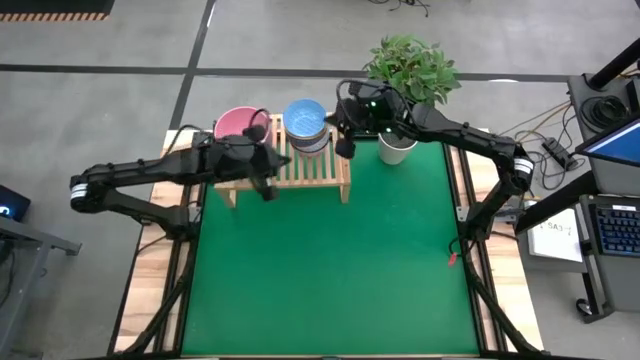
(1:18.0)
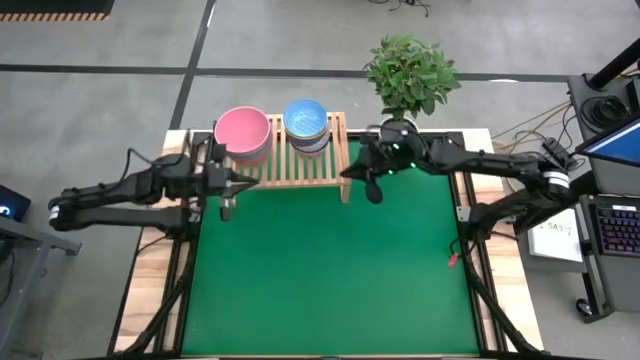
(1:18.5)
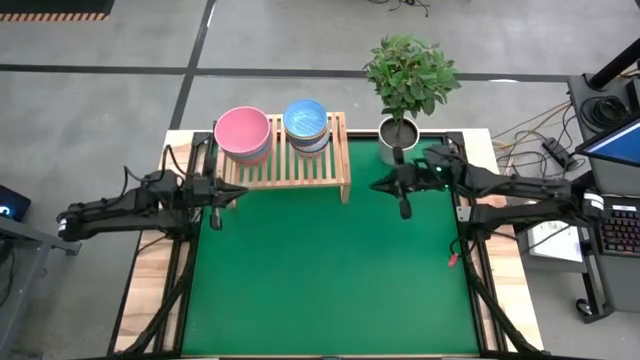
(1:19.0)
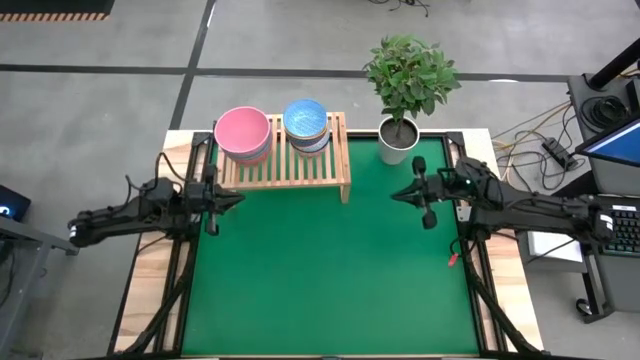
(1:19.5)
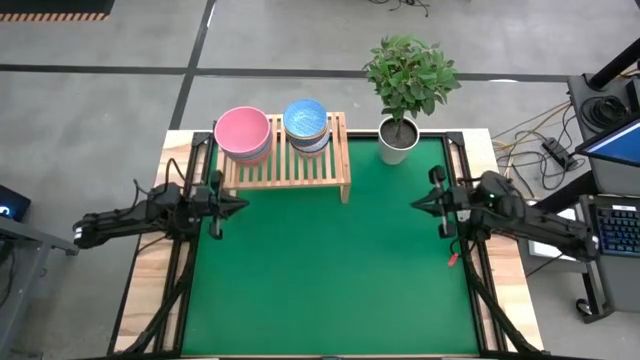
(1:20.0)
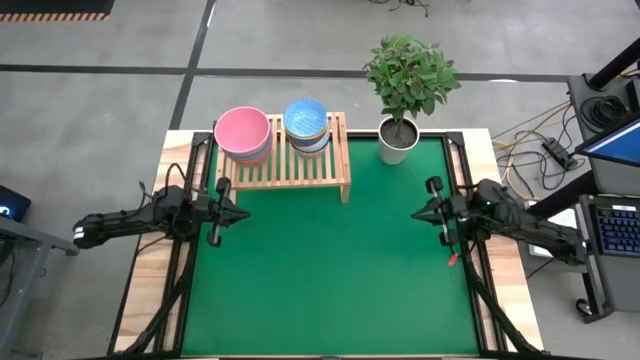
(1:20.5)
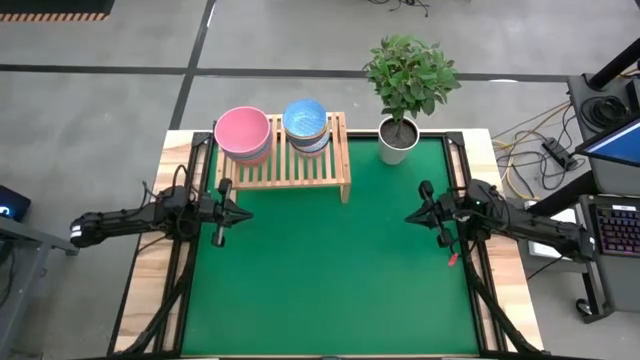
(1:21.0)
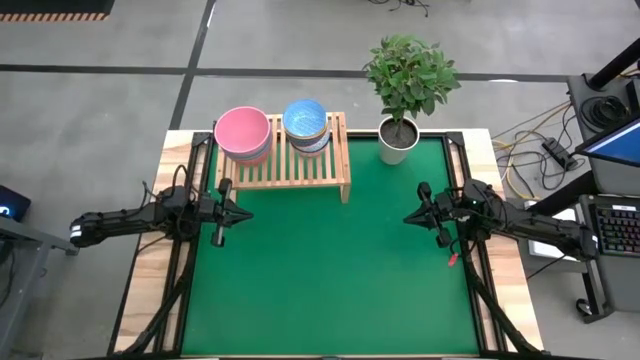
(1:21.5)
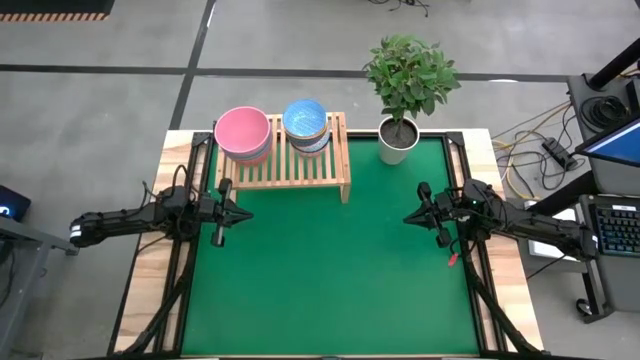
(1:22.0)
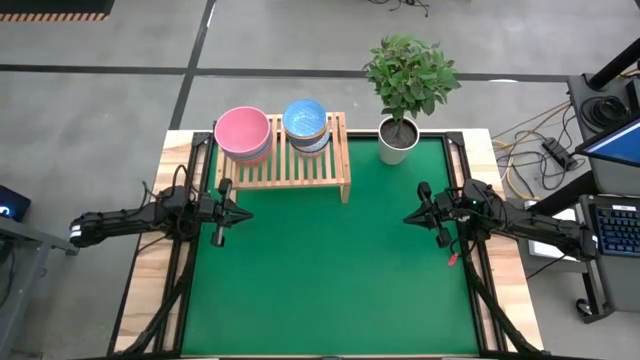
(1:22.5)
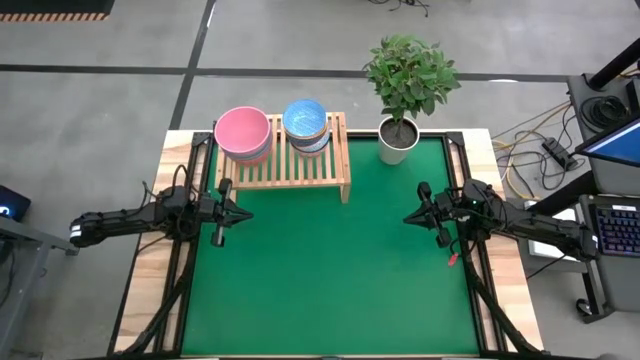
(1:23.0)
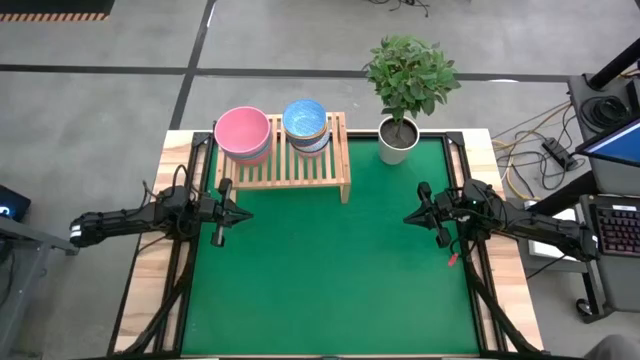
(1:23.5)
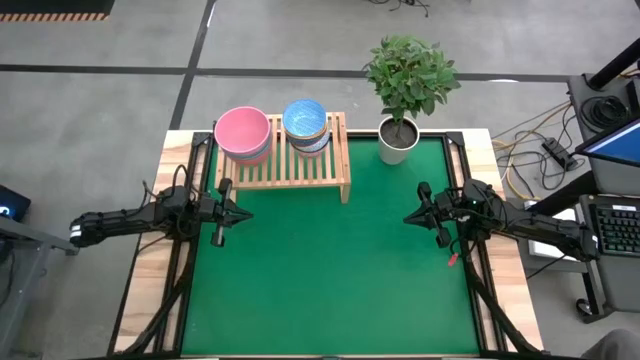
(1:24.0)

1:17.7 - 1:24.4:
Task: Place and stack bowls onto a shelf
Return to Home Position

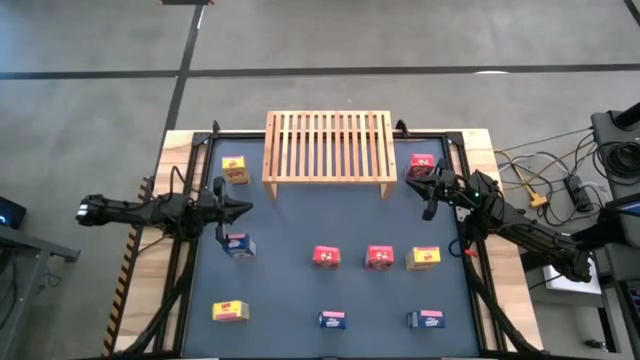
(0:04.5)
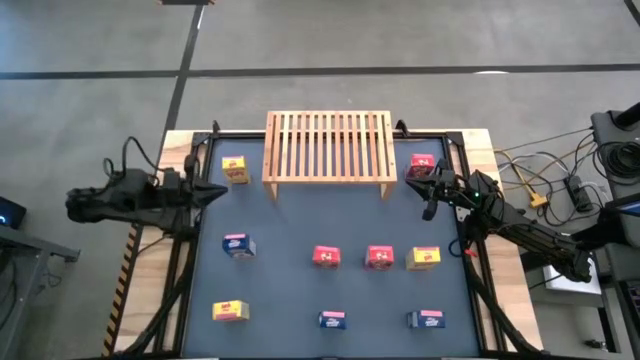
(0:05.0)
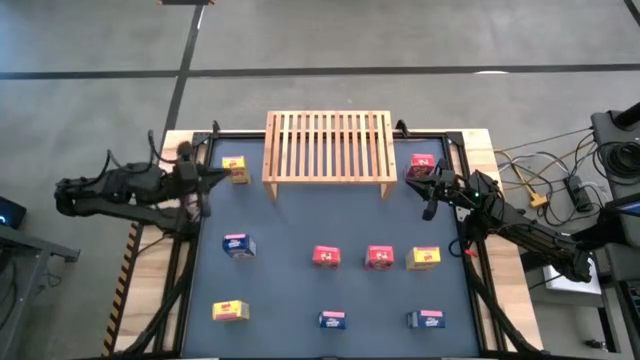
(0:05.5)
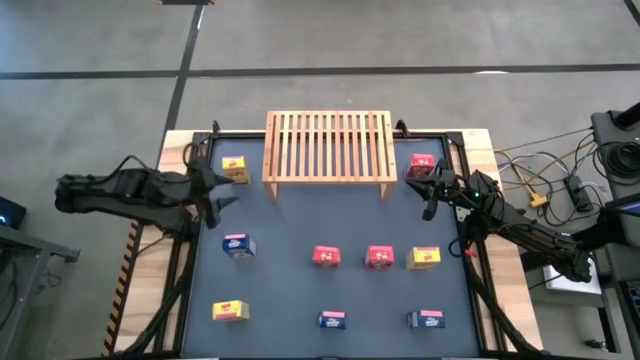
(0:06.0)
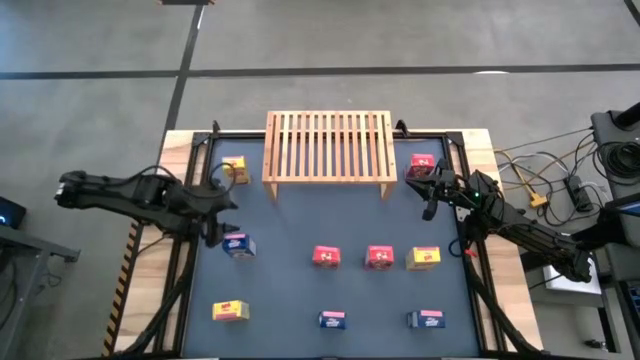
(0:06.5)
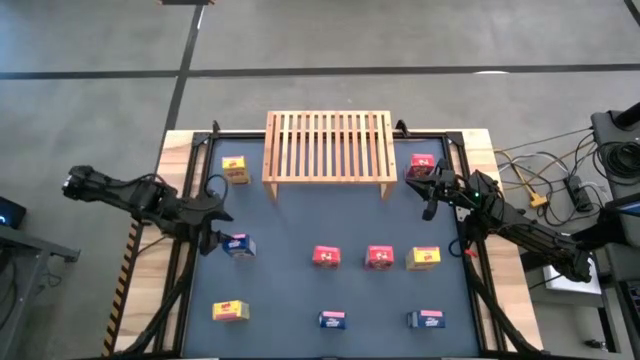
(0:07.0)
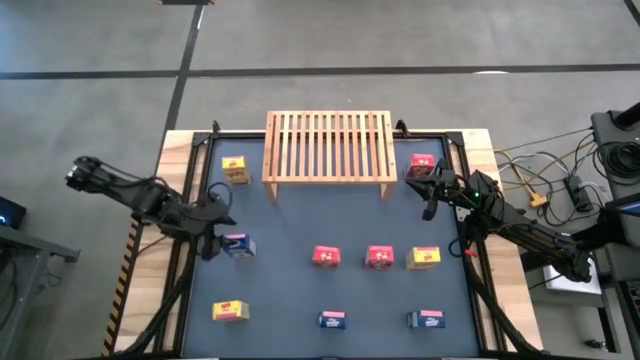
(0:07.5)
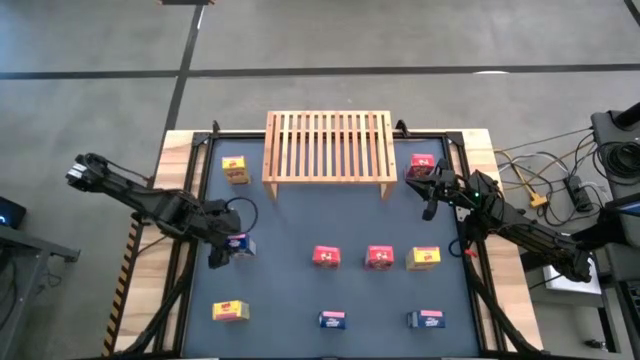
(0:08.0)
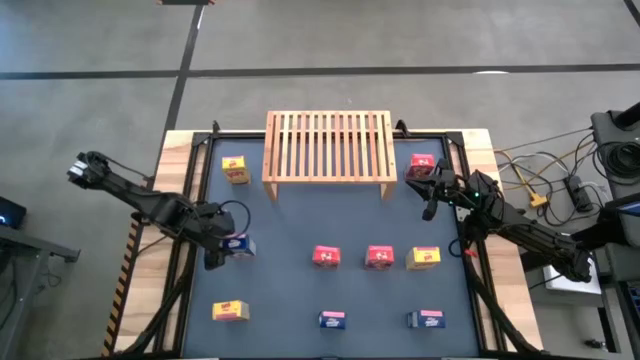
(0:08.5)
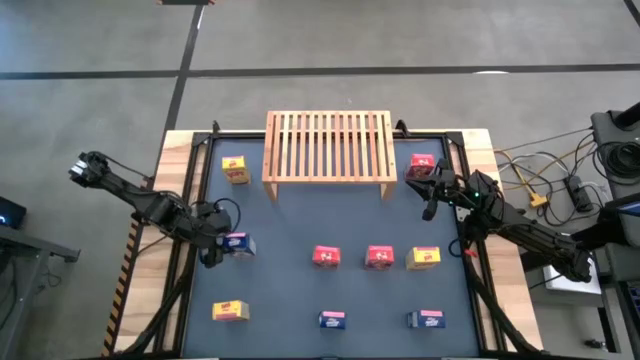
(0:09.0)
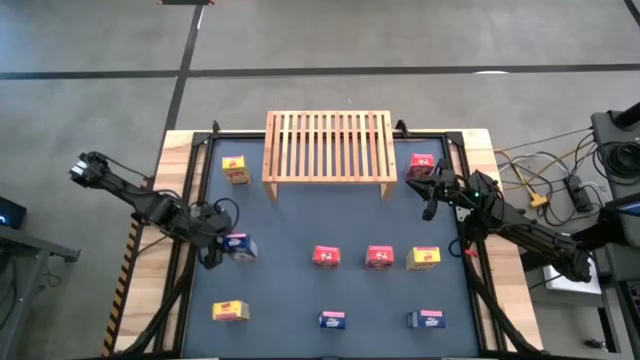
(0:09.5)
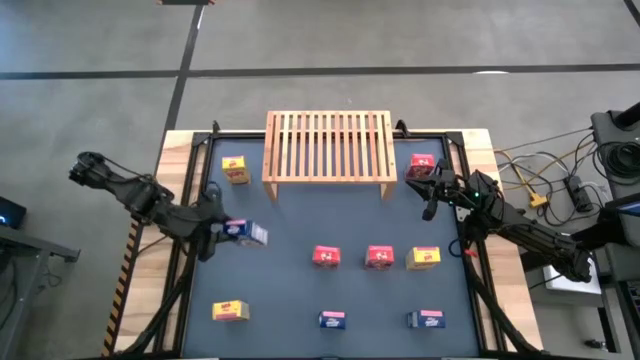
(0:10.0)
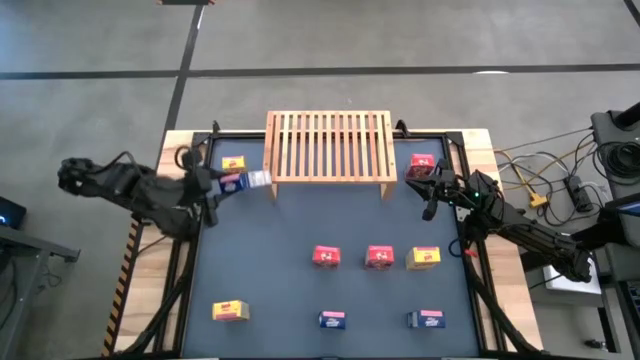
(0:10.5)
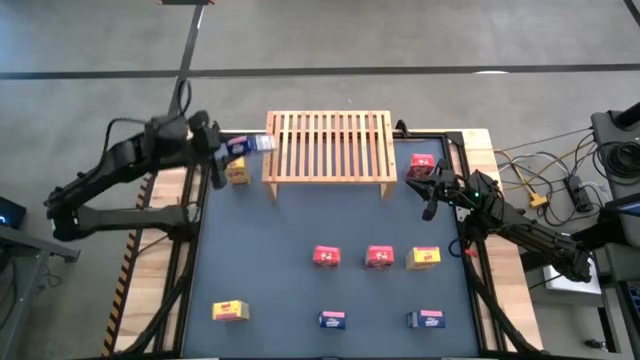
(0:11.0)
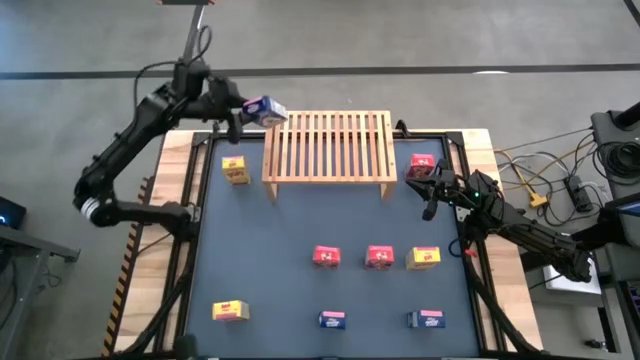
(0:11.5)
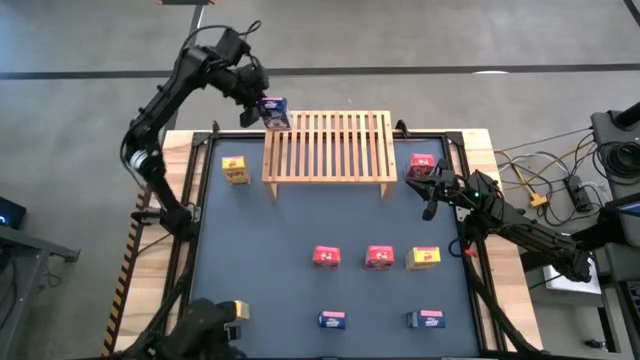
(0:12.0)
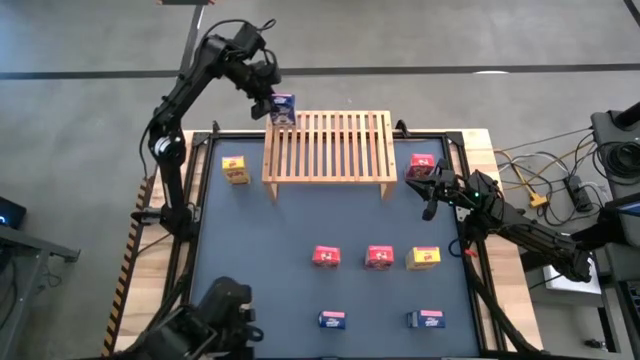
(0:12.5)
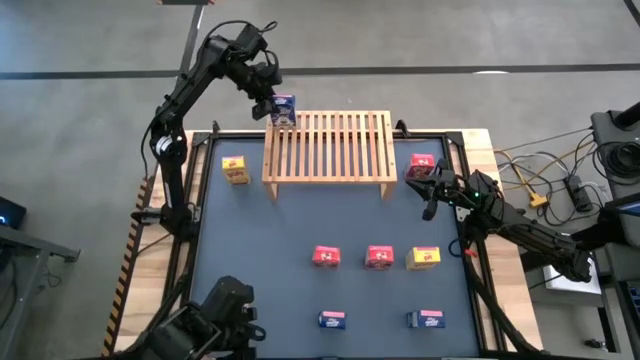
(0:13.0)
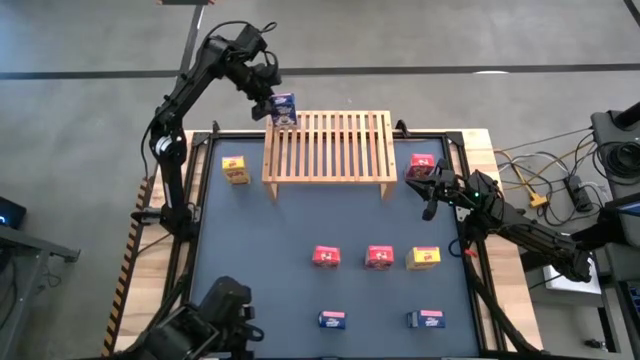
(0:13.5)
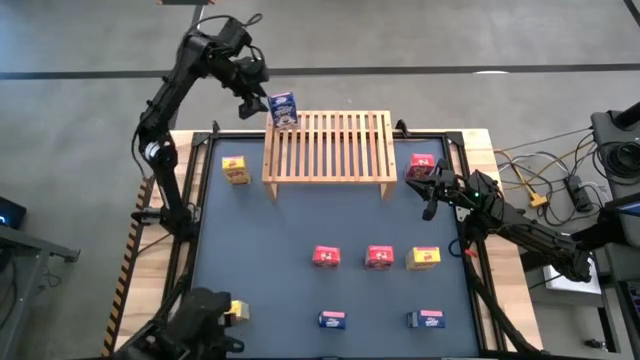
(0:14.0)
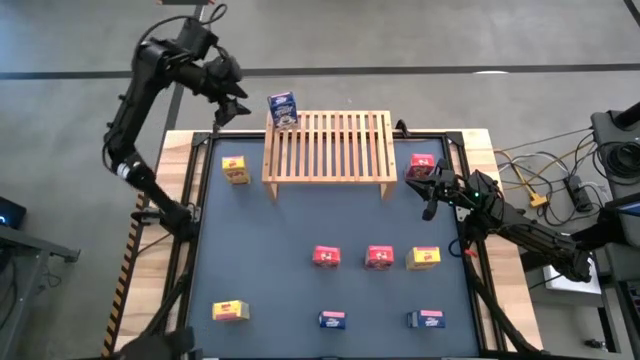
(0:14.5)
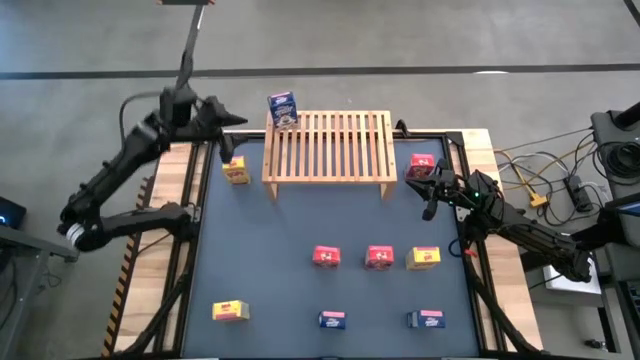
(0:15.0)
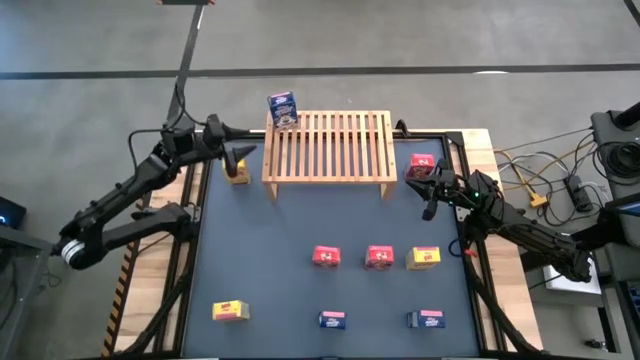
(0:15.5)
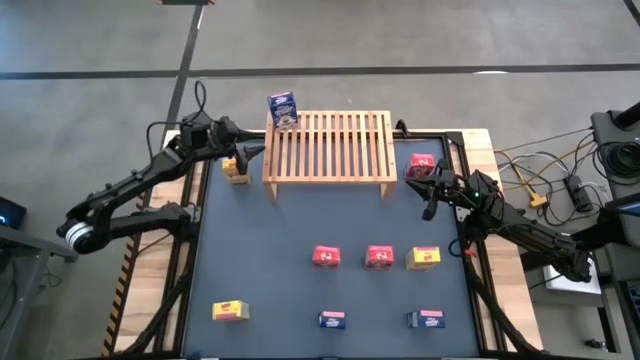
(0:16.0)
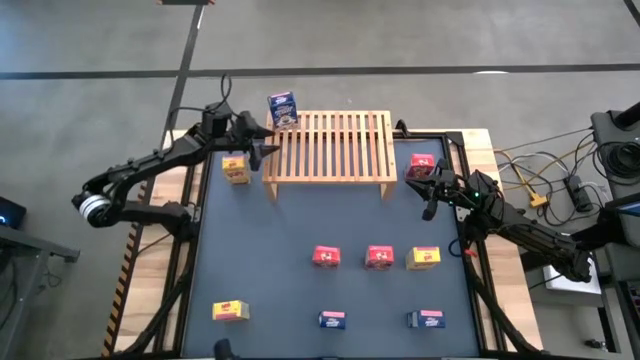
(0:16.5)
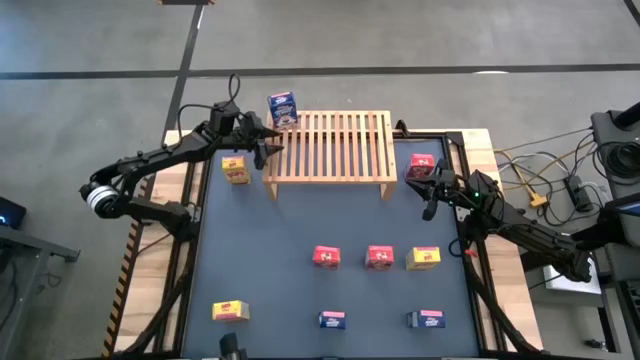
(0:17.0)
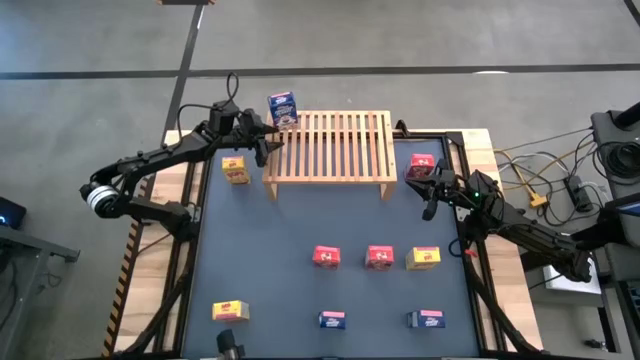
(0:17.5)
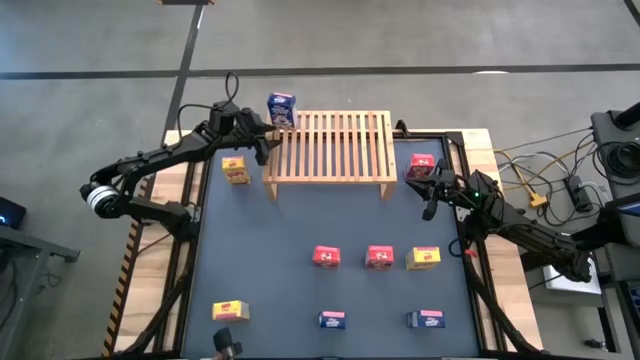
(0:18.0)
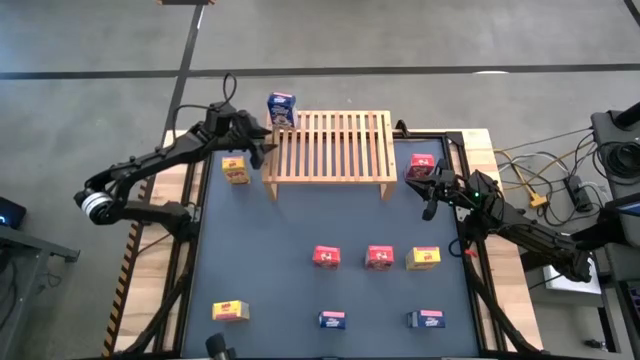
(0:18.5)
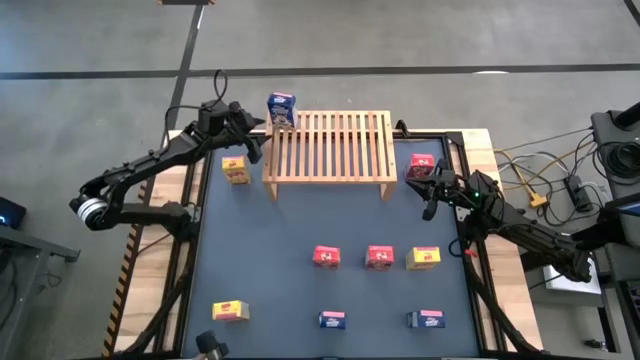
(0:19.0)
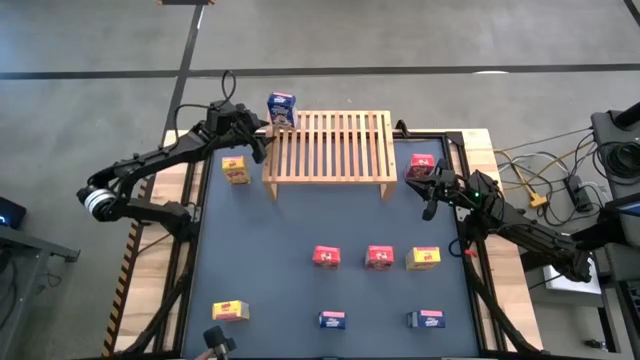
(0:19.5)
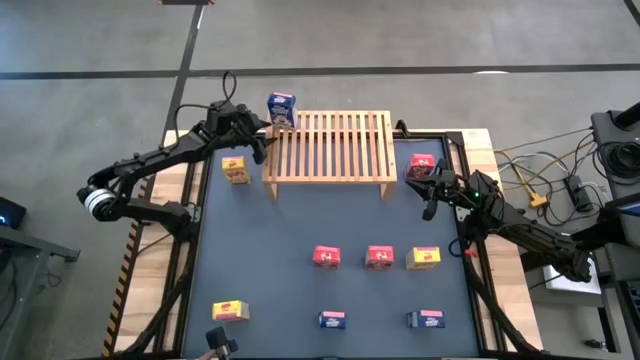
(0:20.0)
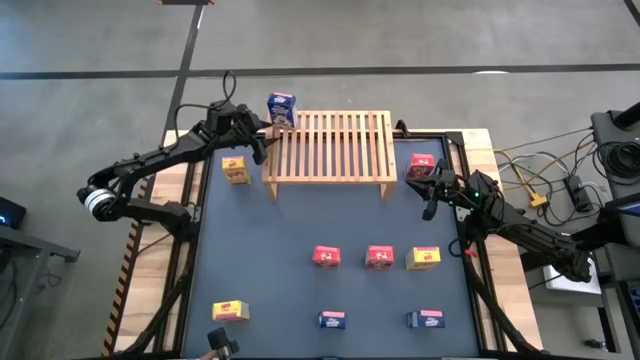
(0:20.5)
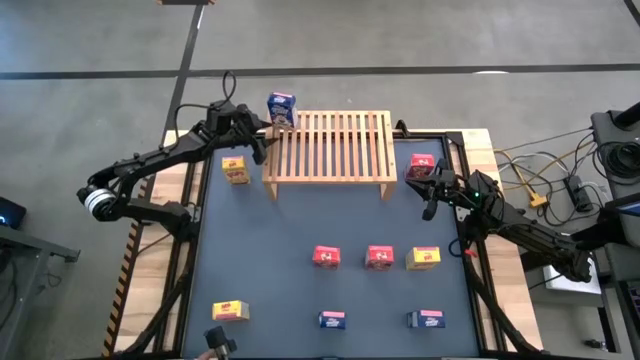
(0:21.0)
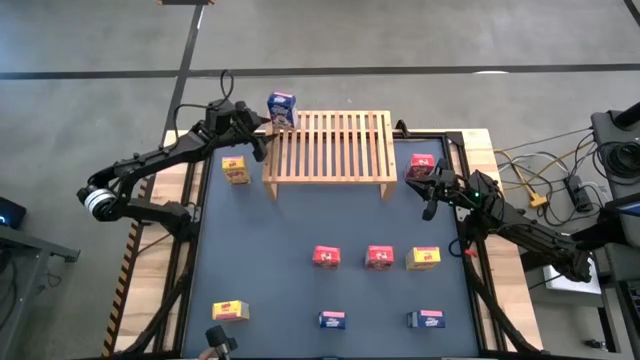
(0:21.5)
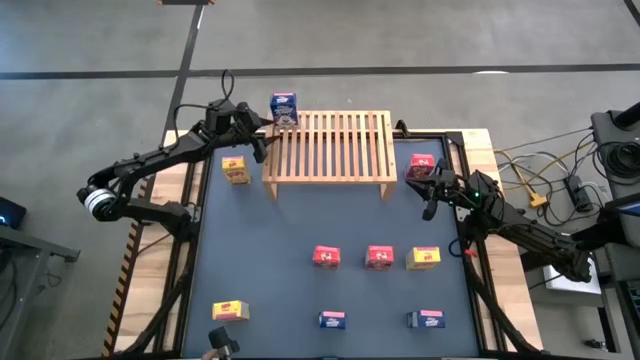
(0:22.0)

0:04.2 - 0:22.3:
Task: Stack cereal on shelf
Put the top blue cereal box on the shelf
